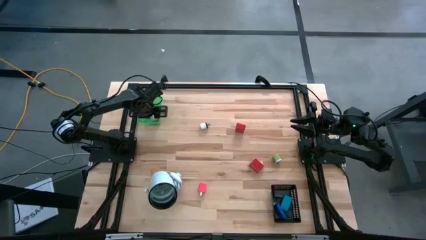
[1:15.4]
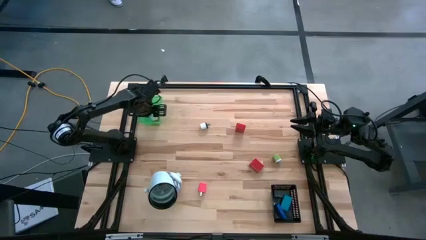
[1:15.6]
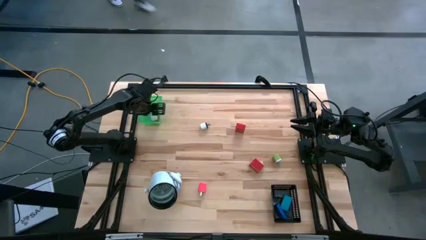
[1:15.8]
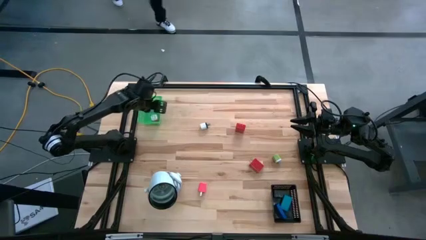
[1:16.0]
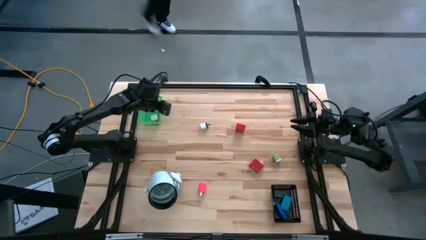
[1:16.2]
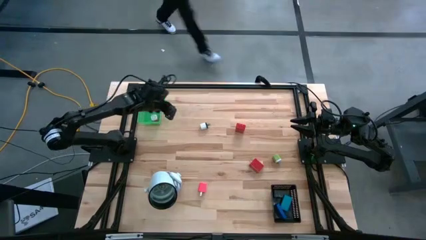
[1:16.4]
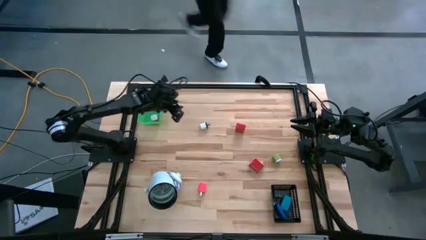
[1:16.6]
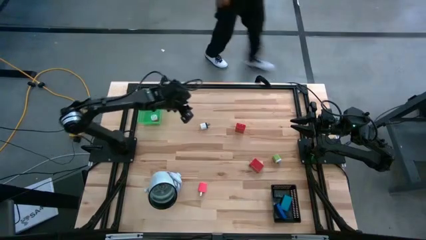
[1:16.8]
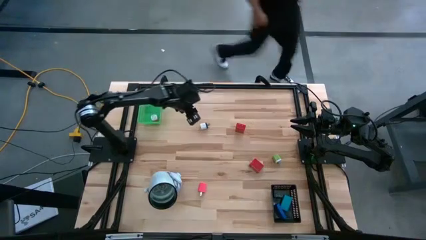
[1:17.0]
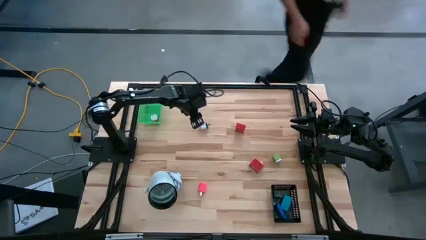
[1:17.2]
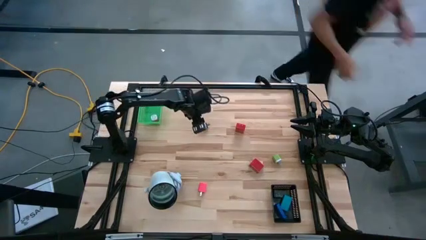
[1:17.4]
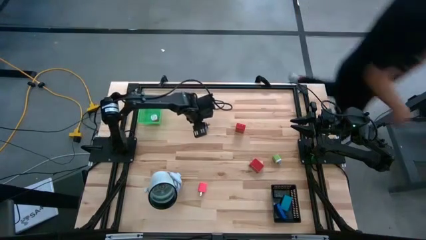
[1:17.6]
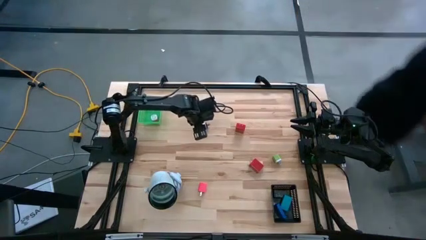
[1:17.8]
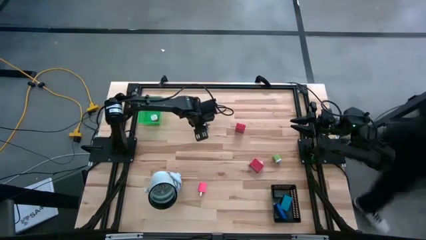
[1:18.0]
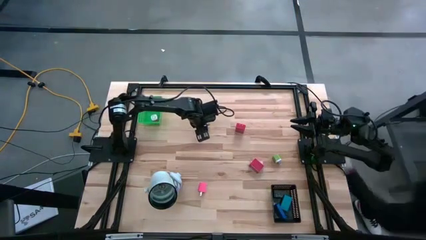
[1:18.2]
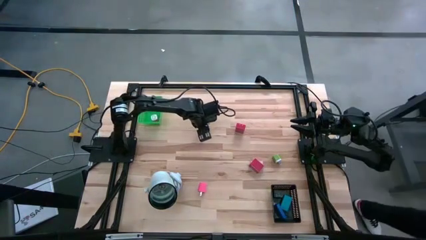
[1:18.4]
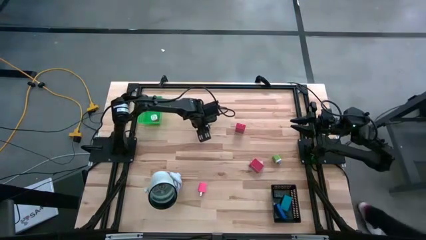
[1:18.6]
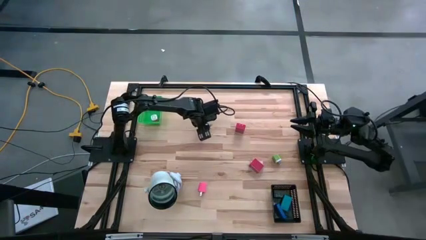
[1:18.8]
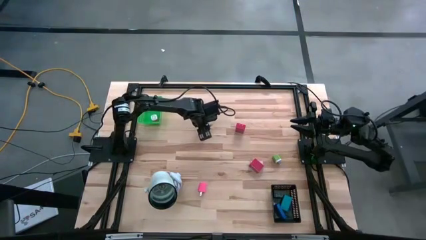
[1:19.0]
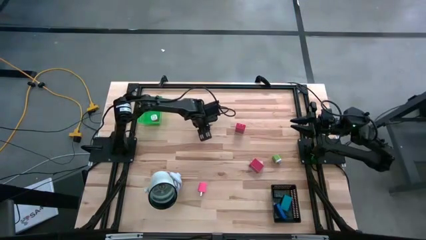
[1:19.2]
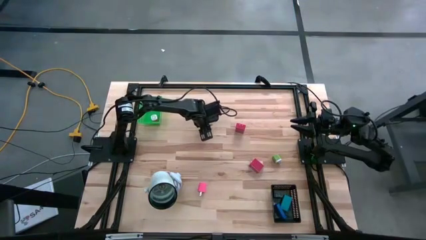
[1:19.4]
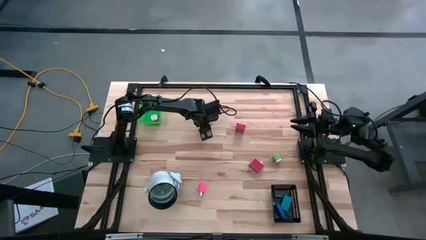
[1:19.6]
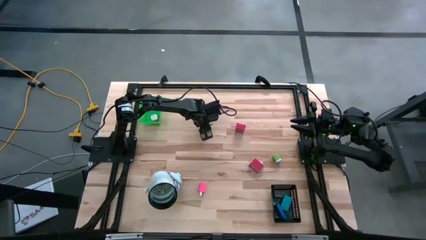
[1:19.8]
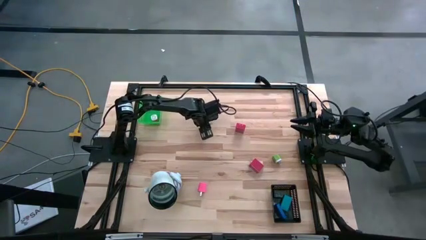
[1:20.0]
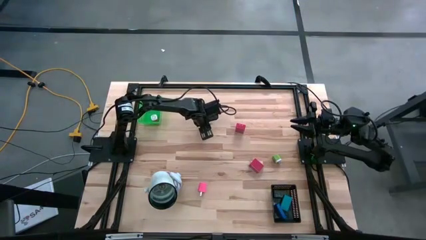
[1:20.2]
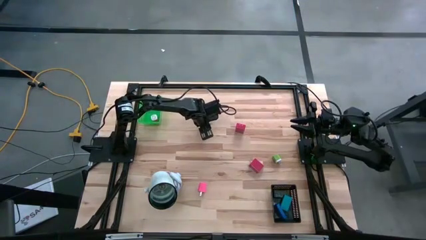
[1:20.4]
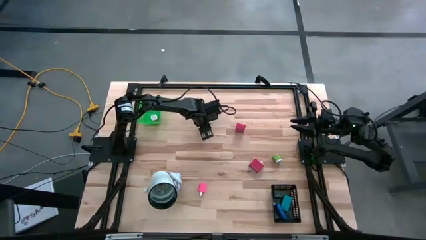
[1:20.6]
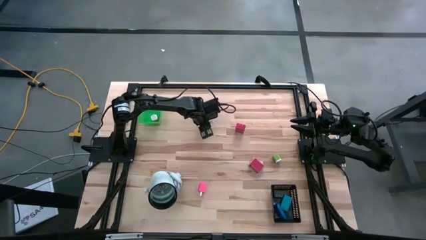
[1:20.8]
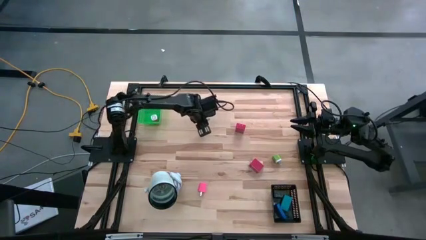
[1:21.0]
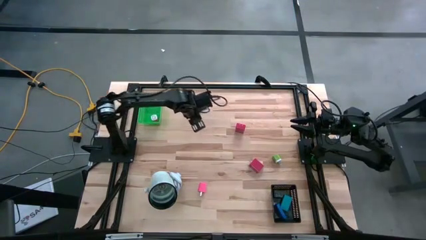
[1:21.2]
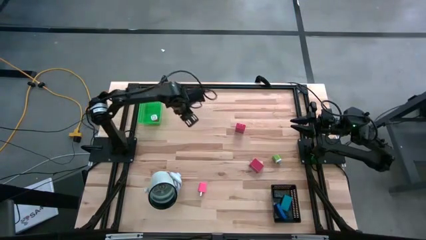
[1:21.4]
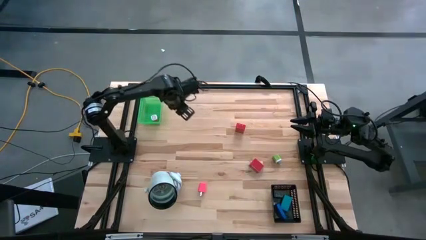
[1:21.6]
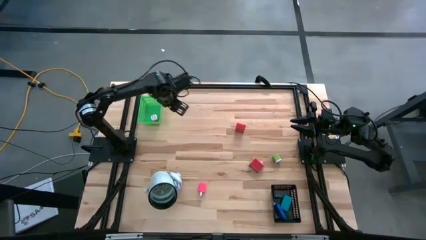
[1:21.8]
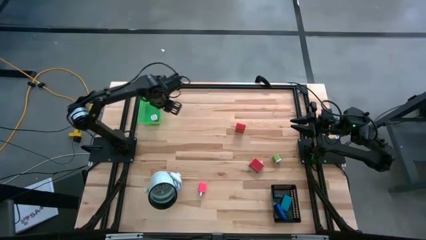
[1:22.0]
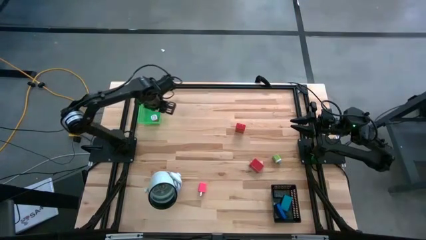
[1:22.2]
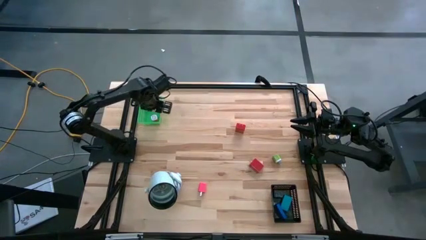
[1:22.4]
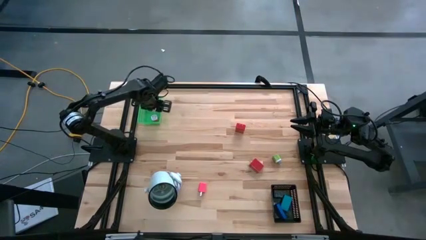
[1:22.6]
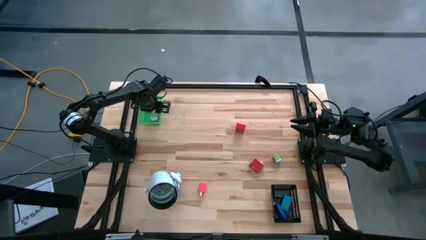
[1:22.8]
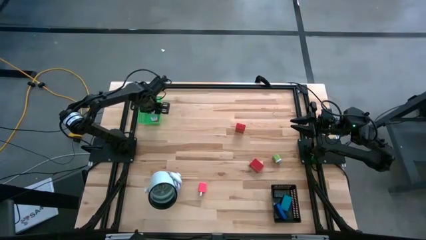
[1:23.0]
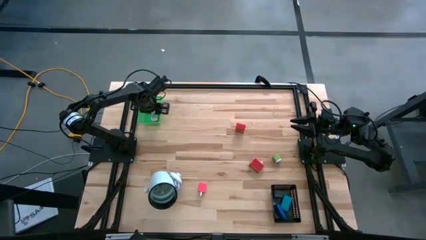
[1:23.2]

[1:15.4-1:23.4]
Task: Pick & Place Office items
Put the white charger adapter into the green bin

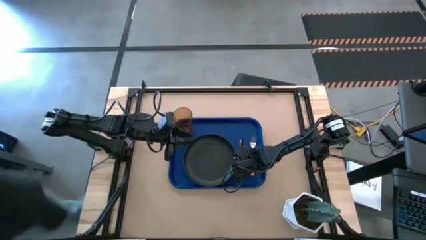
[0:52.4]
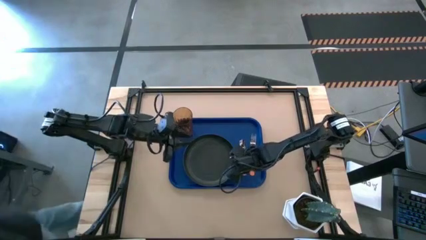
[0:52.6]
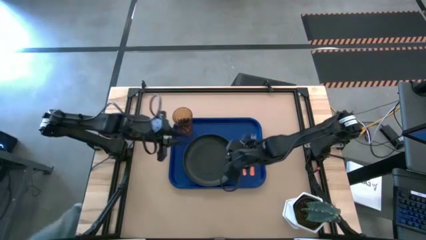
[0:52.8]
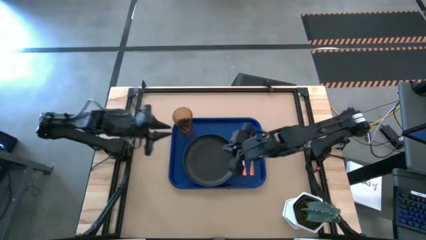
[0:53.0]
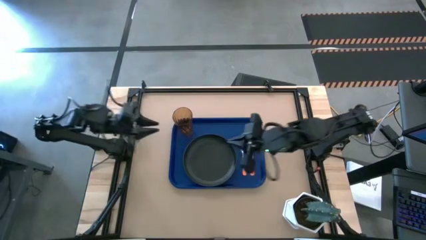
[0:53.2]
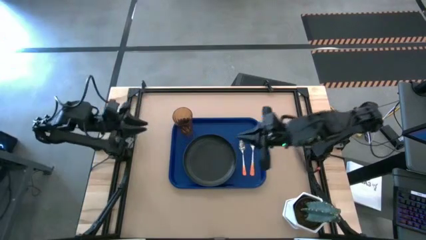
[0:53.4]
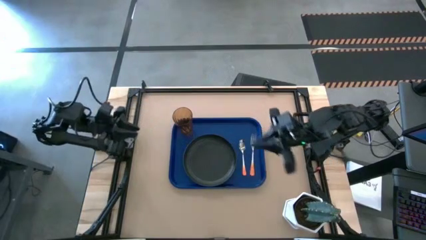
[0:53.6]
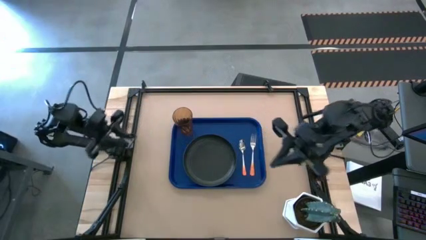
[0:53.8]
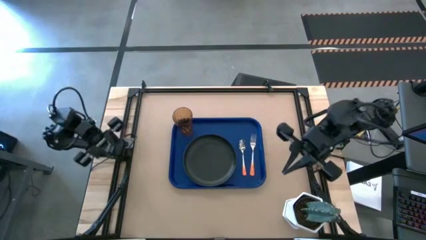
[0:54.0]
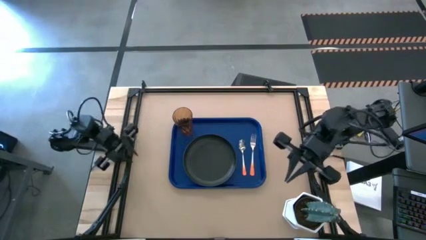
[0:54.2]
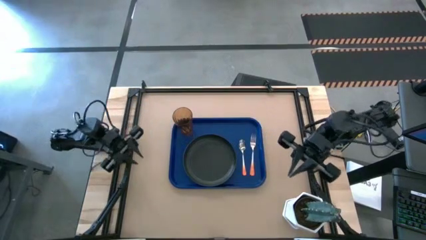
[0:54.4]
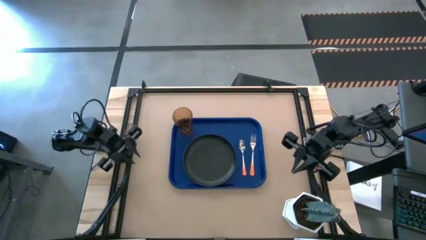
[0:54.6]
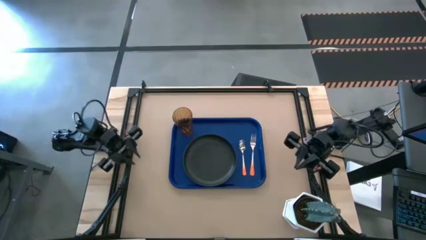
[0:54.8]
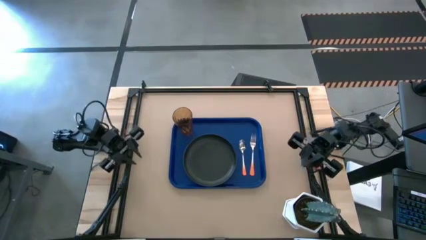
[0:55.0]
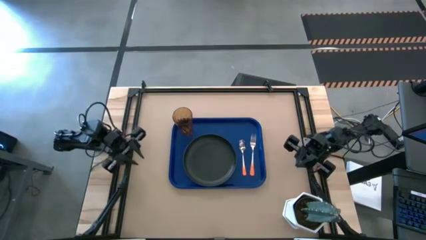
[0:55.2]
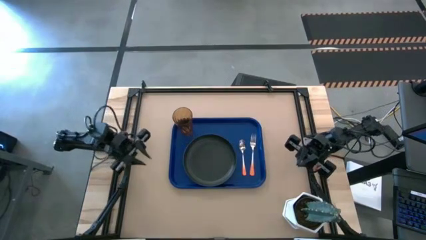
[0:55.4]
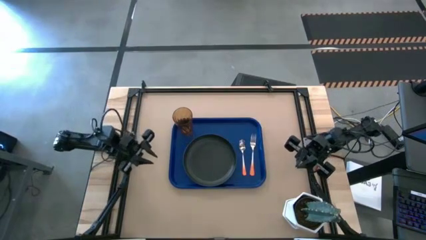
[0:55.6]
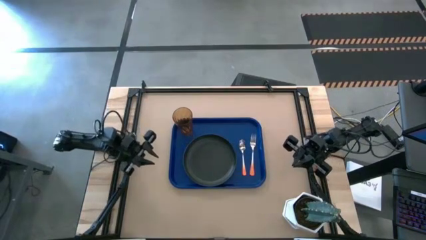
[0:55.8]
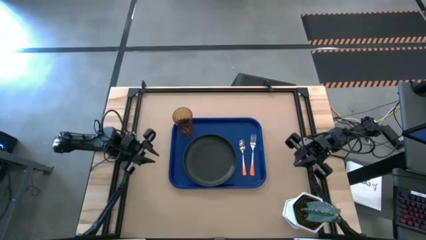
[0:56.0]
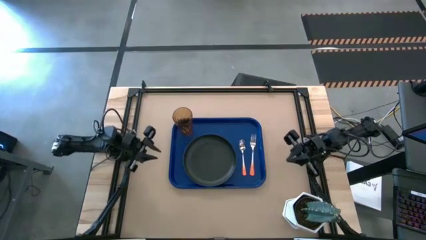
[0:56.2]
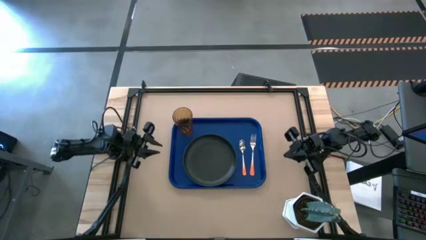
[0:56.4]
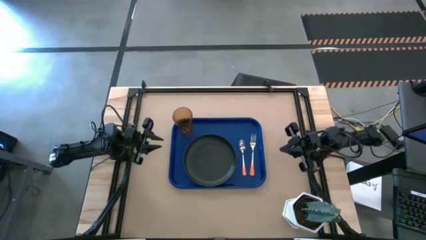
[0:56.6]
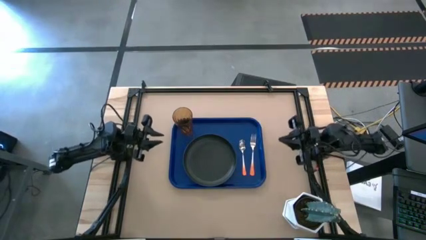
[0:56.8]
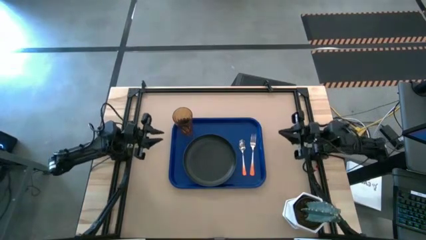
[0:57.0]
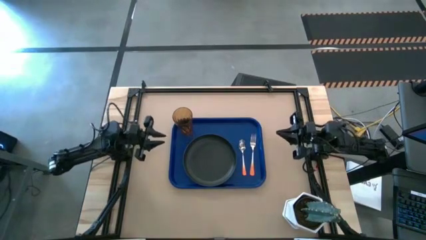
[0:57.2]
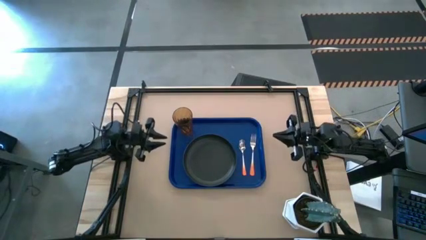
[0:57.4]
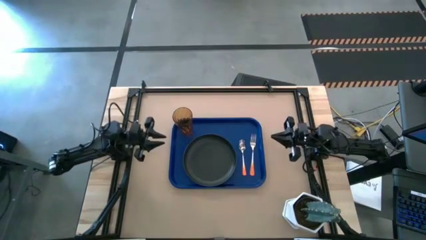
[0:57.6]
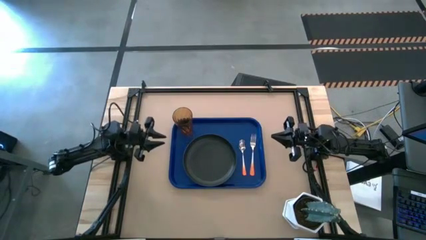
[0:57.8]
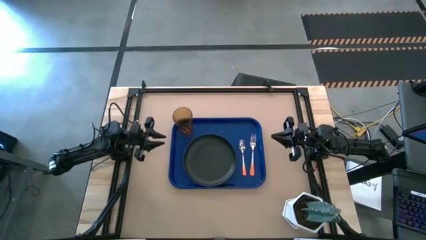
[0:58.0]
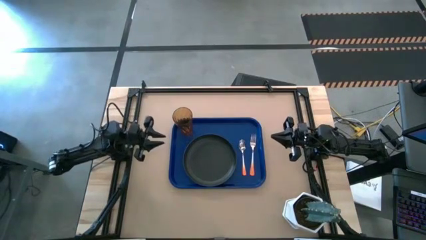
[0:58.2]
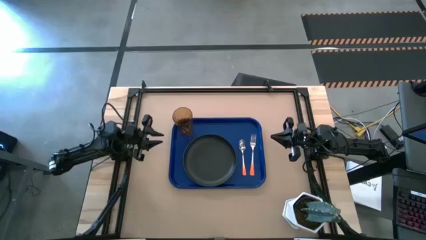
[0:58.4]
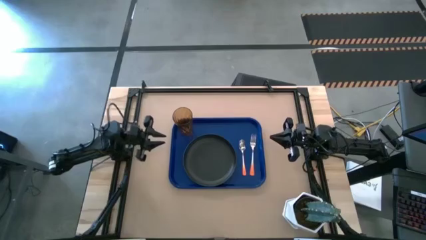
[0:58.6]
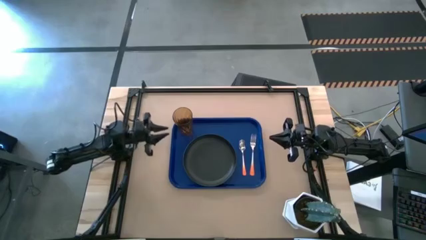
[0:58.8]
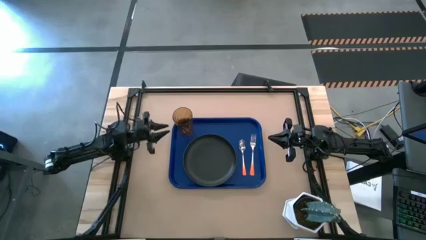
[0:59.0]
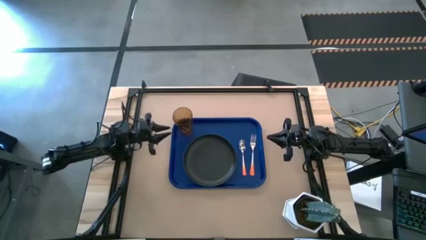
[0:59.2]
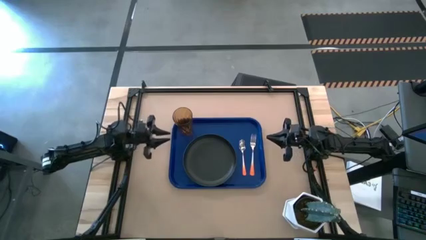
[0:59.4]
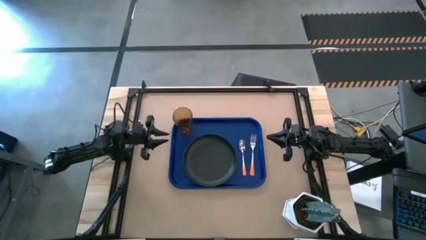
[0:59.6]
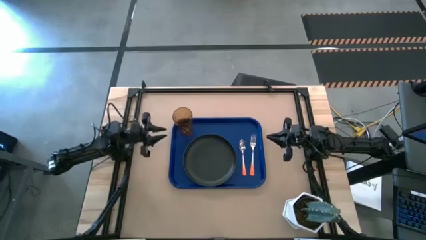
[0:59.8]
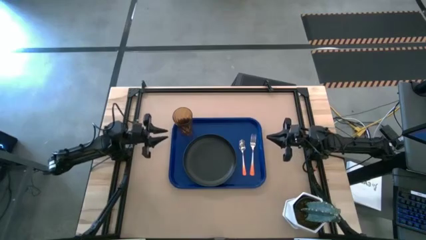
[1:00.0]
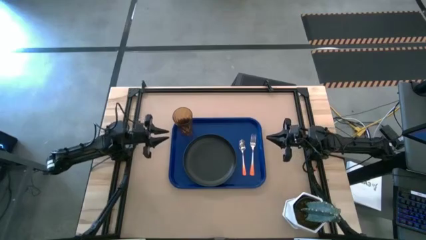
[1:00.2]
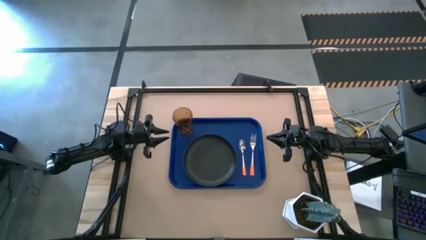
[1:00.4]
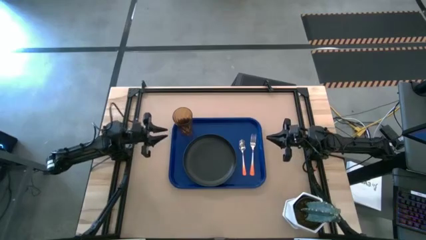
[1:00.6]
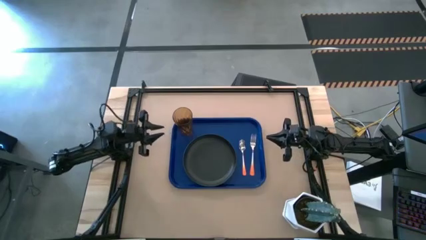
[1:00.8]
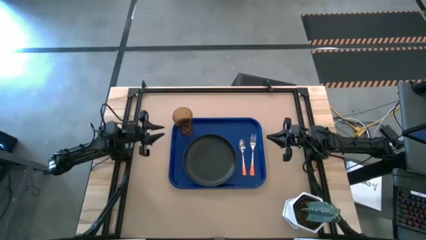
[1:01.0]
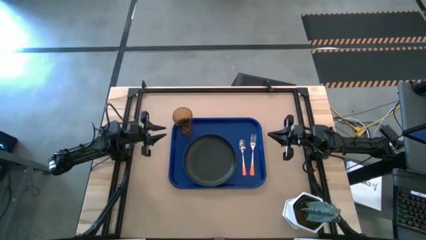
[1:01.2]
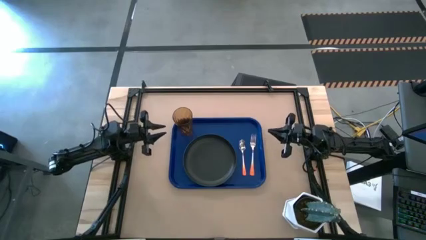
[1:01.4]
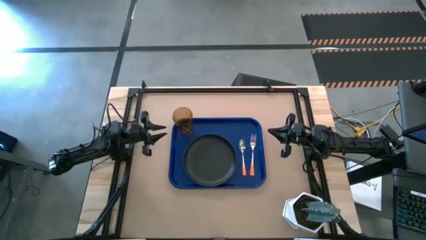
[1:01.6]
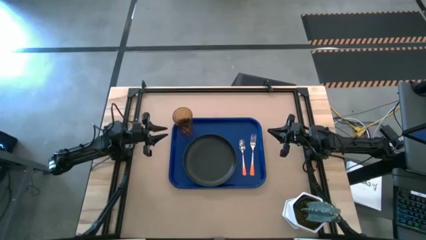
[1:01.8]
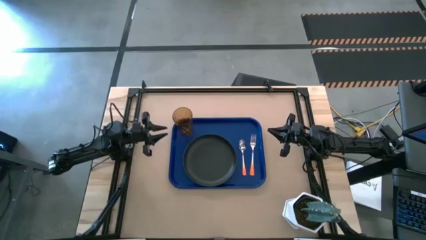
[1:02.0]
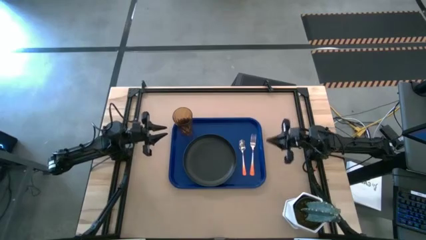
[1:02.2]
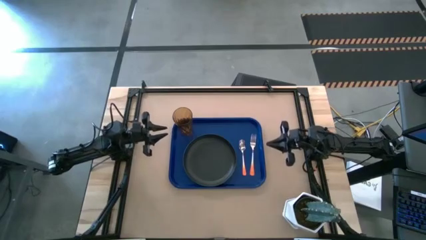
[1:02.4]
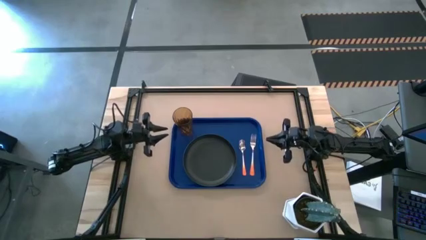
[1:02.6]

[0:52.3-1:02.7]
Task: Pick and place plate/cup/fork/spoon on tray
Return to Home Position
